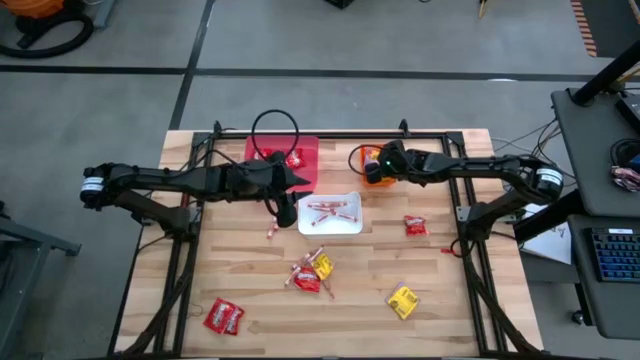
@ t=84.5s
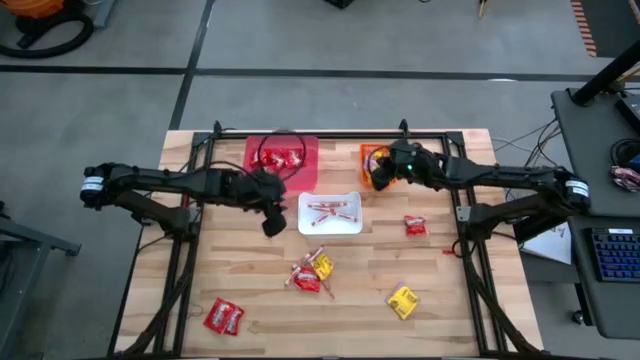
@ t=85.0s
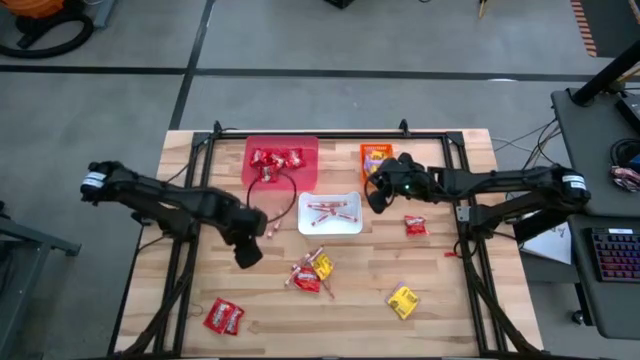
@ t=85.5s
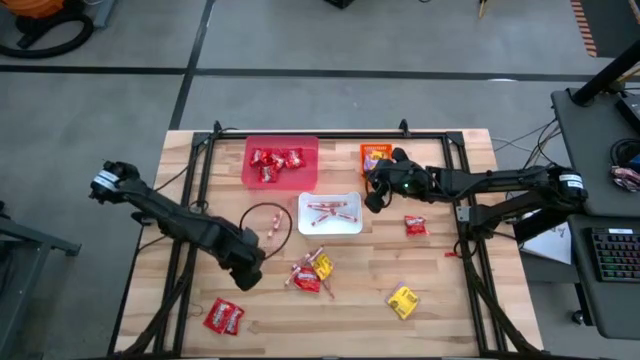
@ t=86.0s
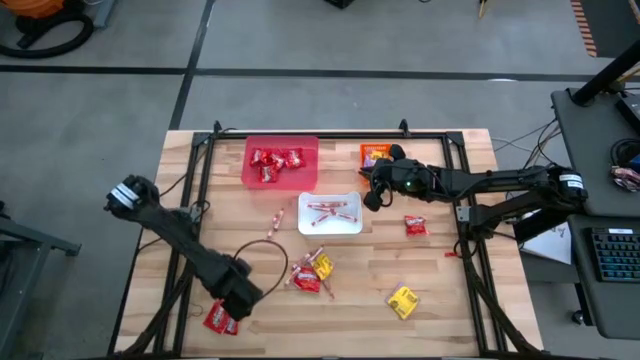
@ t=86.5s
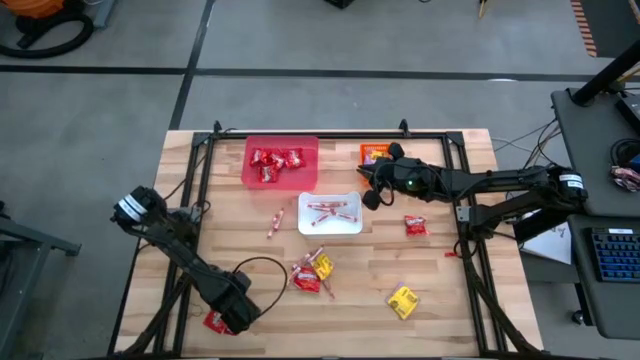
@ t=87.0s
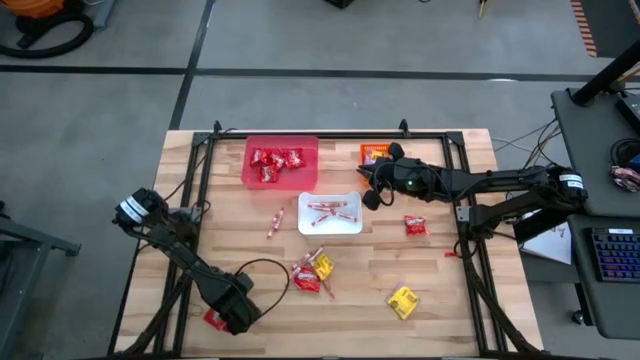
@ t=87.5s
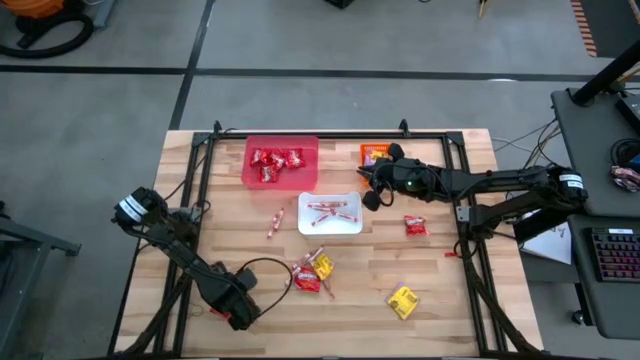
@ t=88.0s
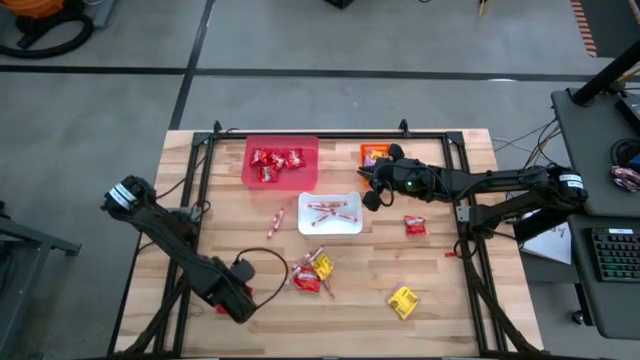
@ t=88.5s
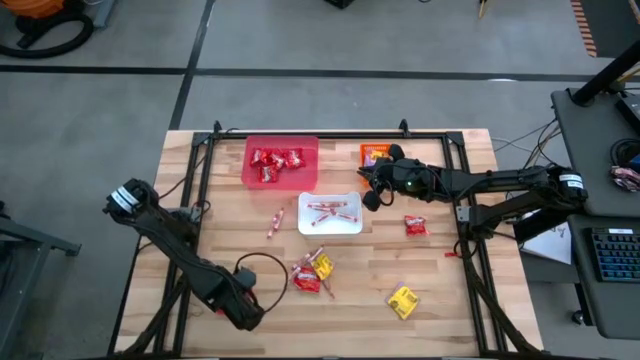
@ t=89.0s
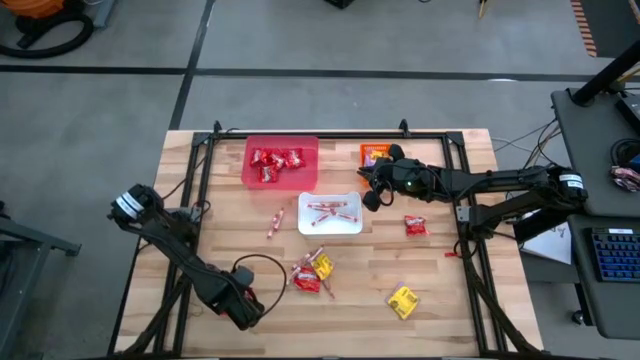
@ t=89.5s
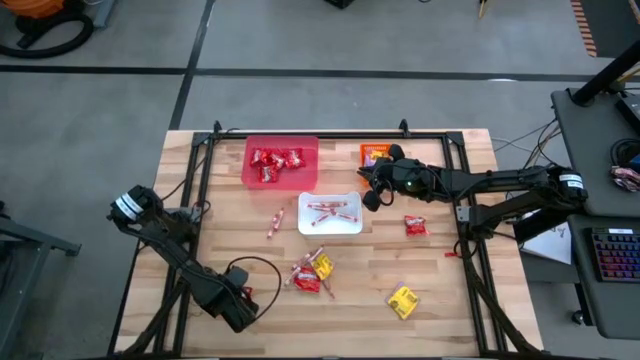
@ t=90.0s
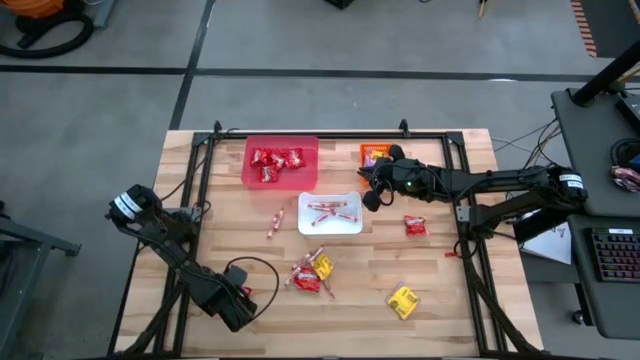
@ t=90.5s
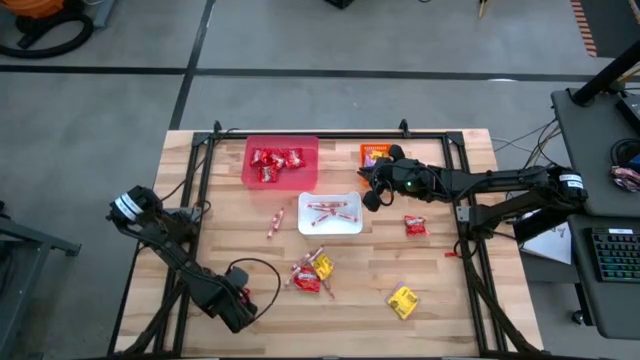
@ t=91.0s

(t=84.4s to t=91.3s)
Task: Sort candy
Put the red chocolate into the red bin

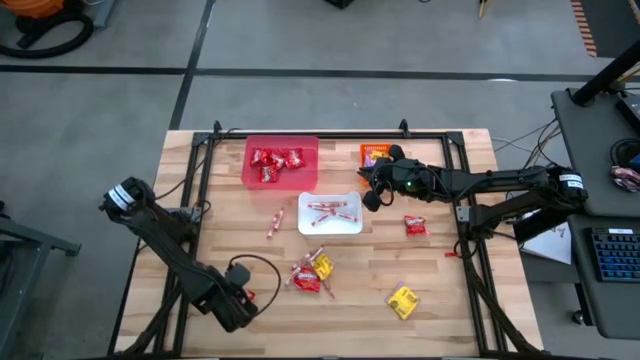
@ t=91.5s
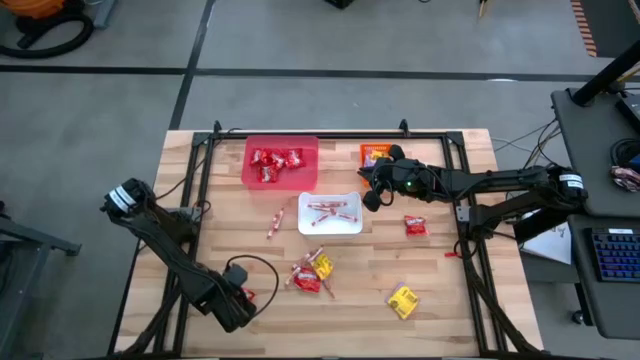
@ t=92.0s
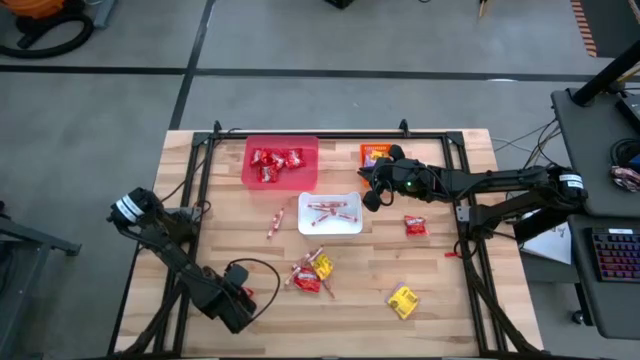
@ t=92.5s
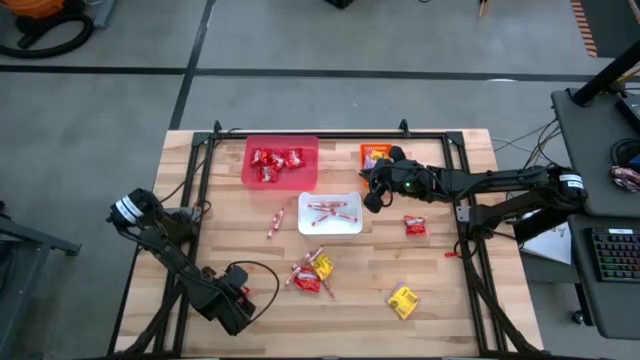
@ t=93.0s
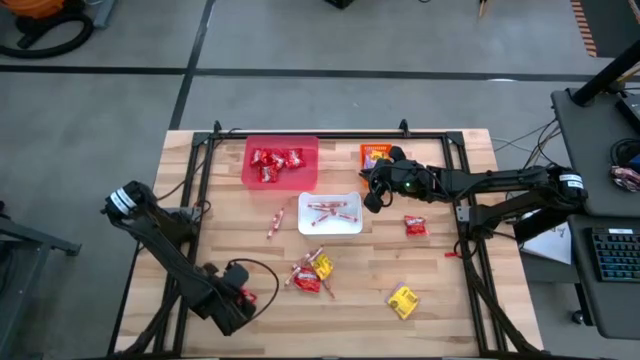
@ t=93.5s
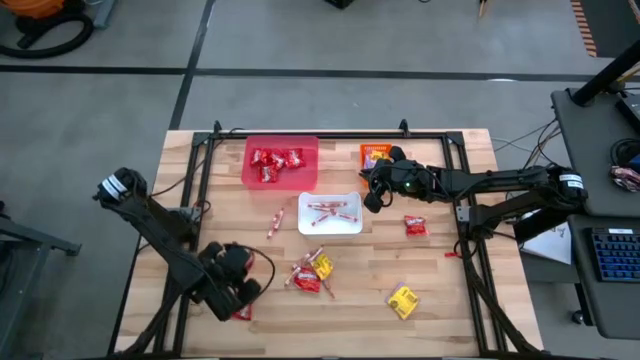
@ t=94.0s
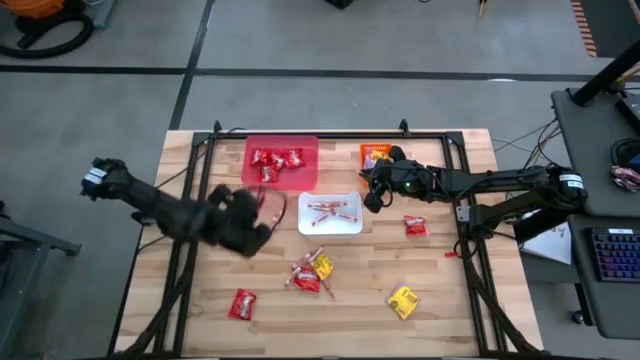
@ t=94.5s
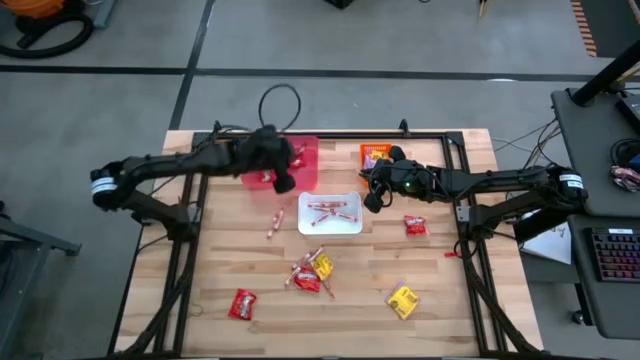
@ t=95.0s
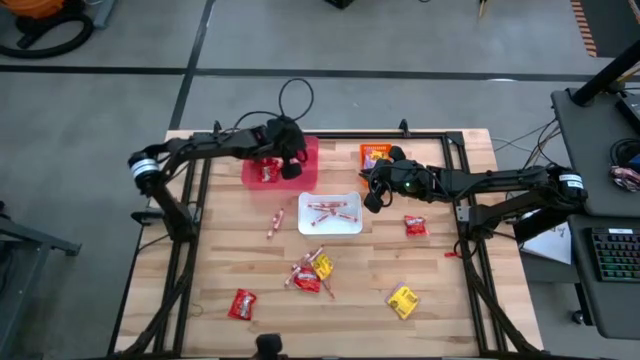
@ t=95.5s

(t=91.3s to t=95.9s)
Put the red chocolate into the red bin

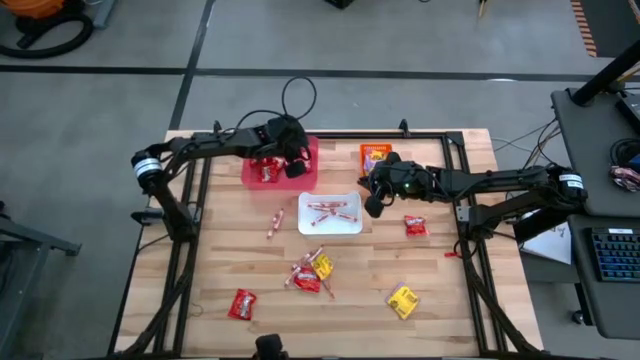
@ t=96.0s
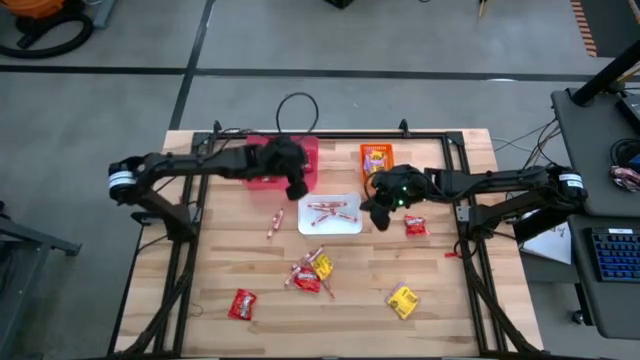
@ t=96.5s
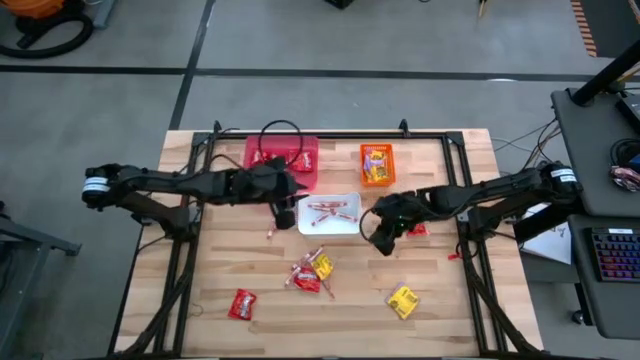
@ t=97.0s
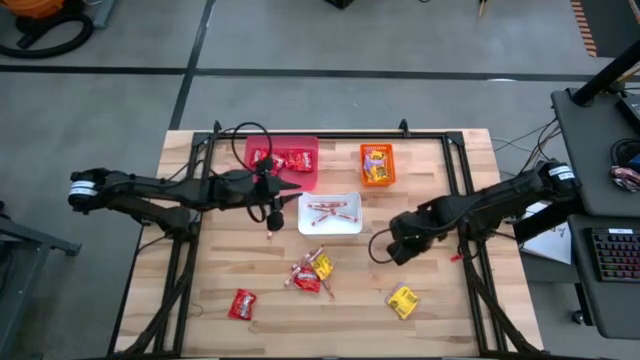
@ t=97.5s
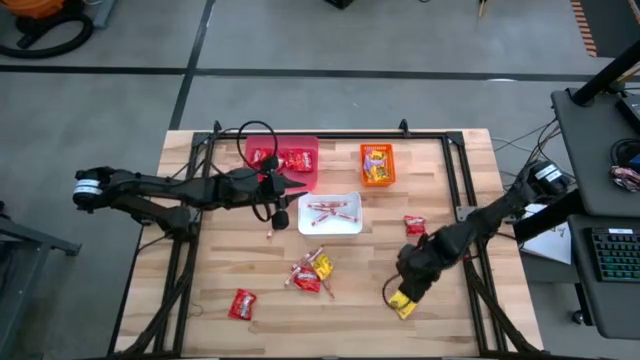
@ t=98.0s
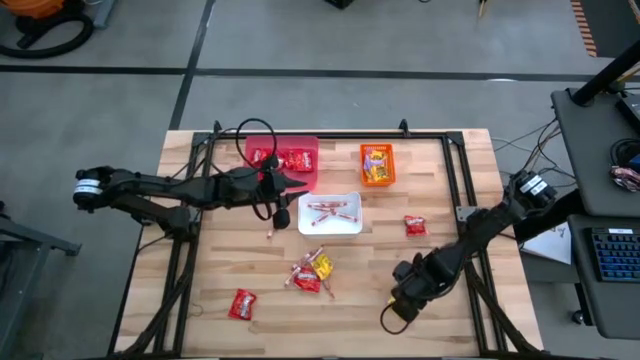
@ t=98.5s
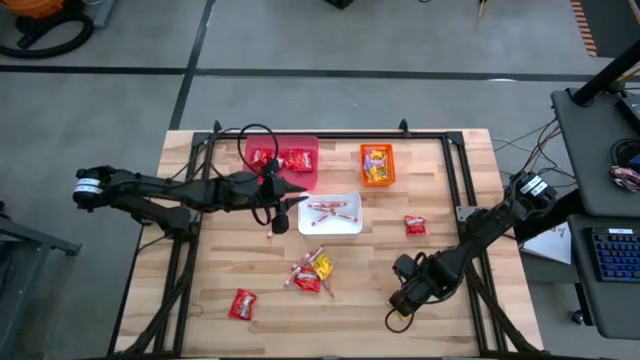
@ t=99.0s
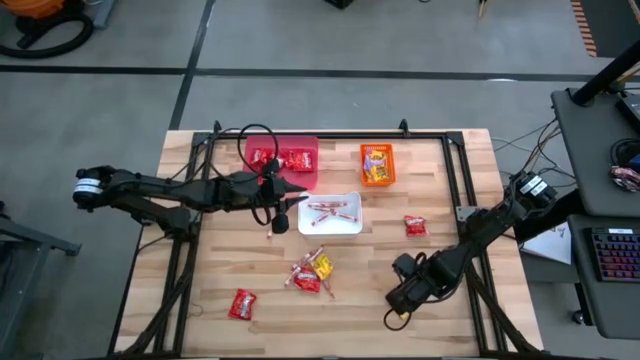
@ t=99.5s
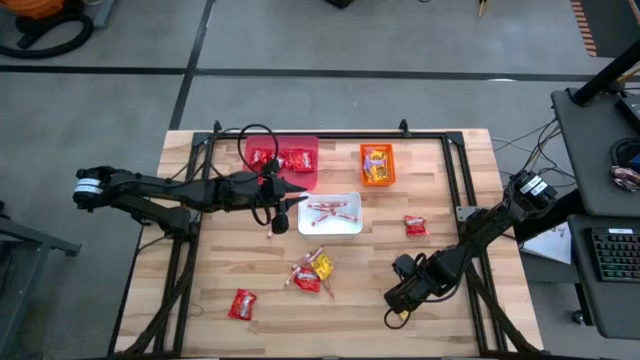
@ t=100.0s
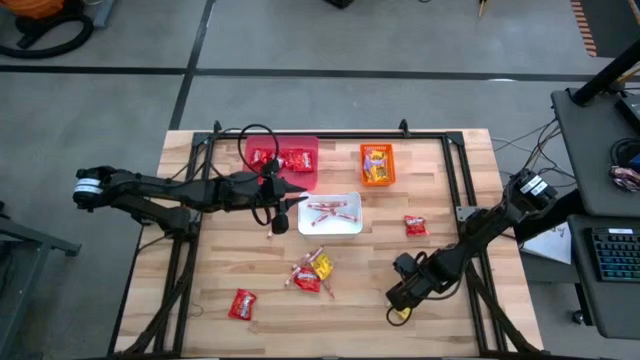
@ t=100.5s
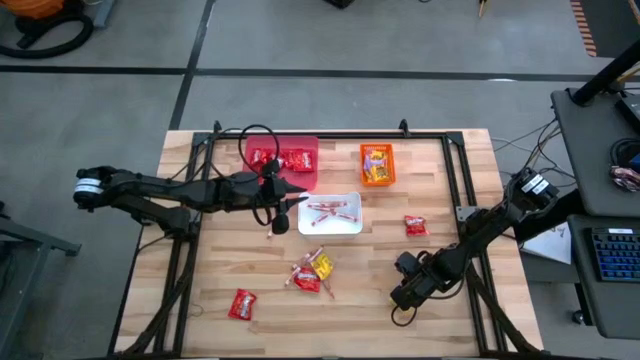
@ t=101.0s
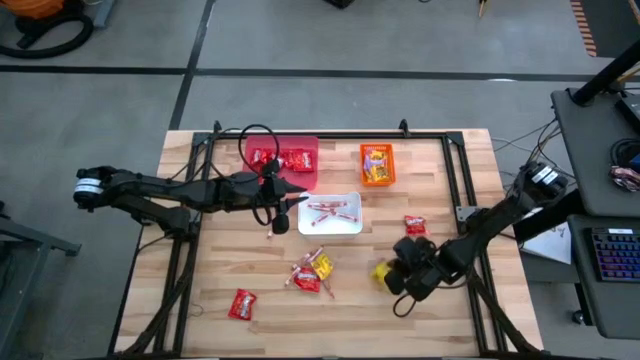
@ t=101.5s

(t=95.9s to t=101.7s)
Put the yellow candy into the orange bin

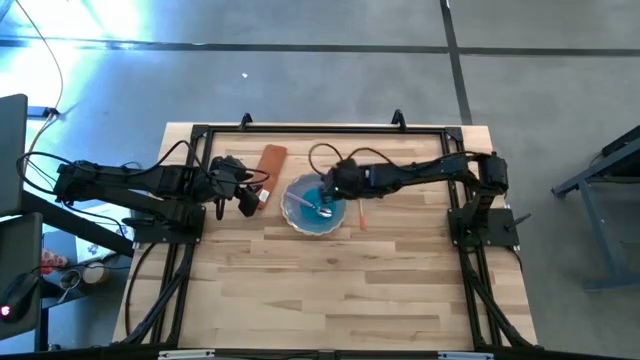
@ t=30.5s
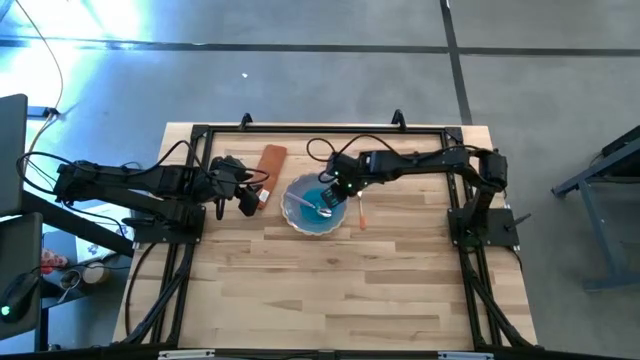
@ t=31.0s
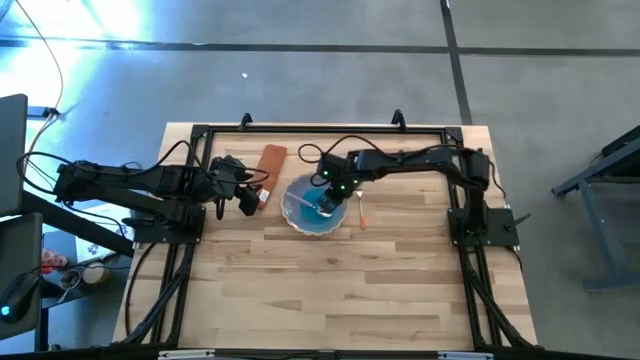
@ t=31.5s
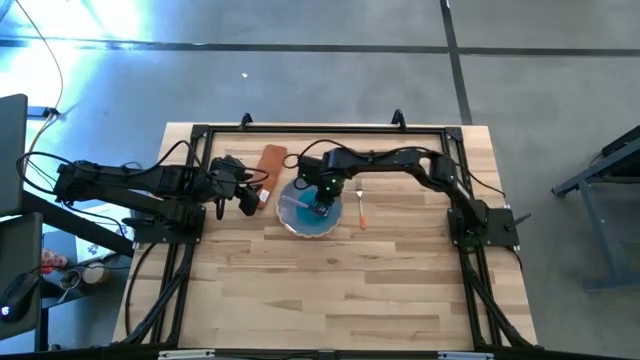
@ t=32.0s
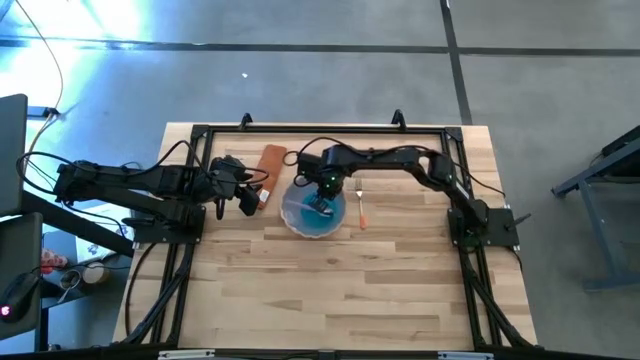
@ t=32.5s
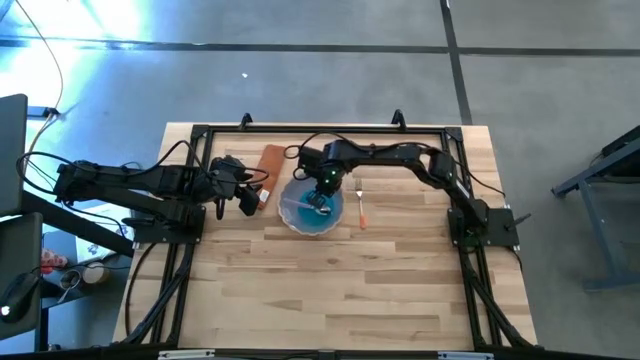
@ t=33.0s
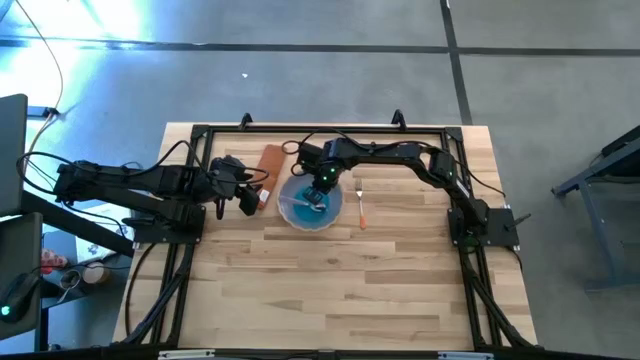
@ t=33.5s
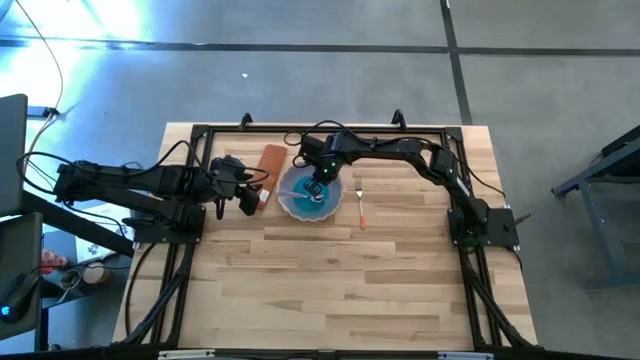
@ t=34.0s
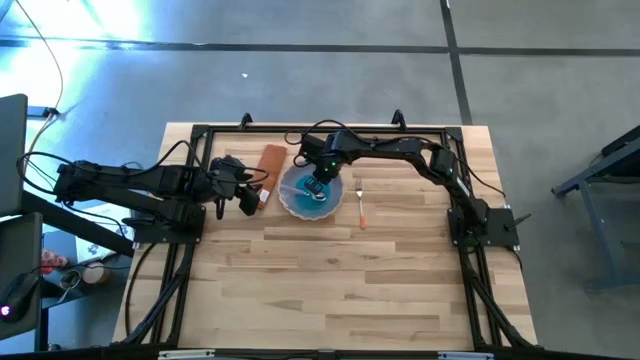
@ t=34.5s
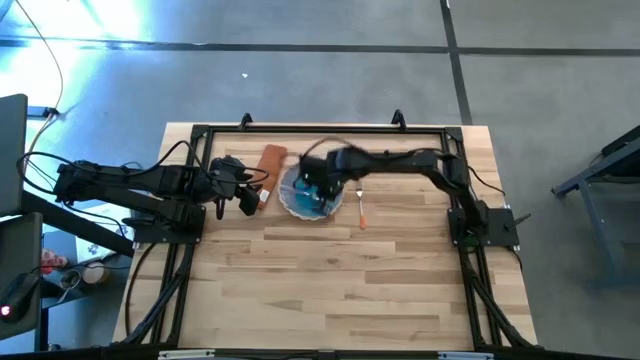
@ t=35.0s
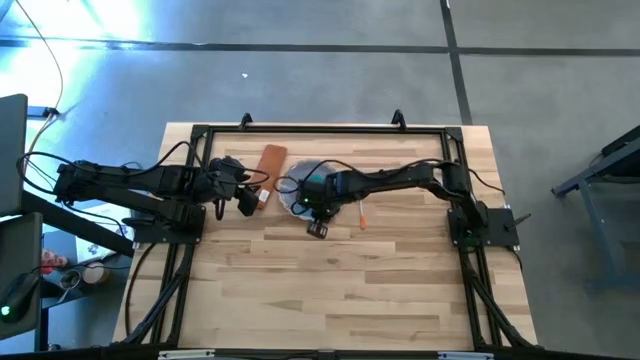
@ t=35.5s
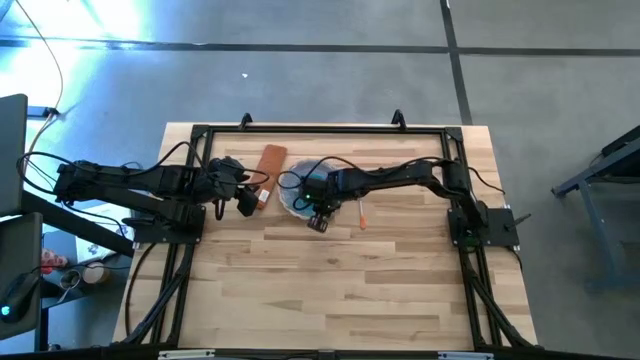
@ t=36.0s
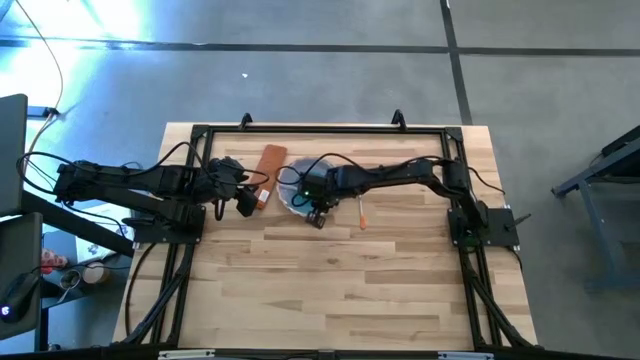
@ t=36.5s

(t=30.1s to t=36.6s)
Task: Set table place
Adjust the blue bowl
